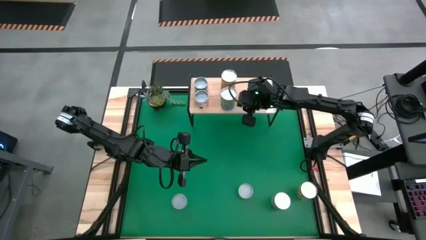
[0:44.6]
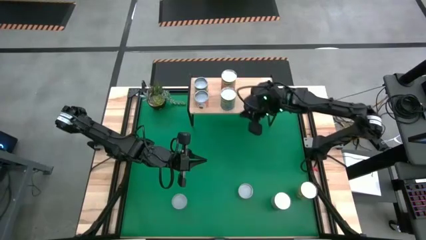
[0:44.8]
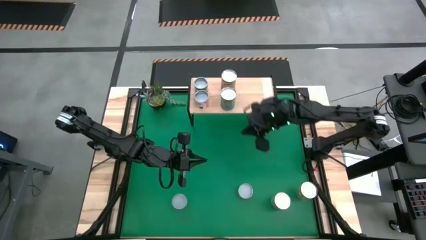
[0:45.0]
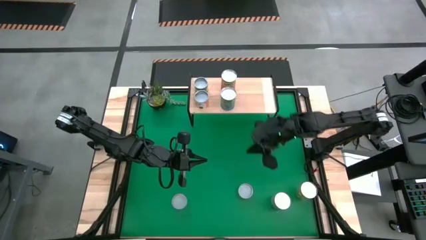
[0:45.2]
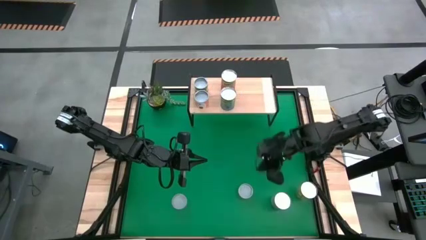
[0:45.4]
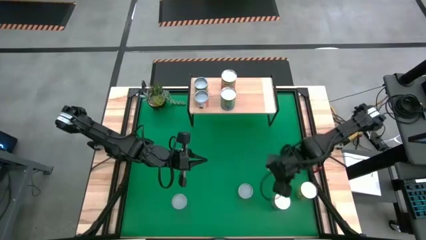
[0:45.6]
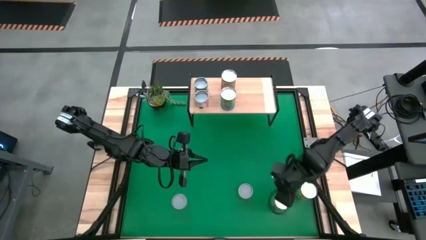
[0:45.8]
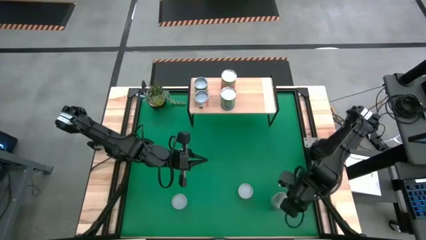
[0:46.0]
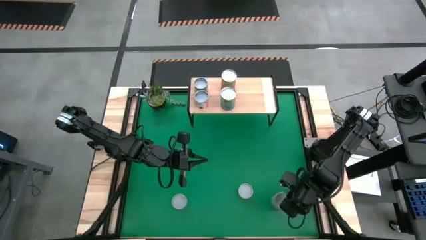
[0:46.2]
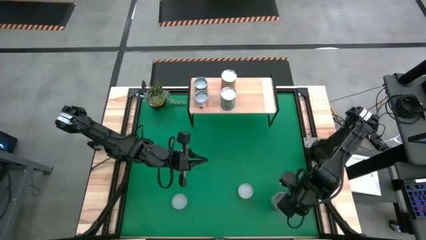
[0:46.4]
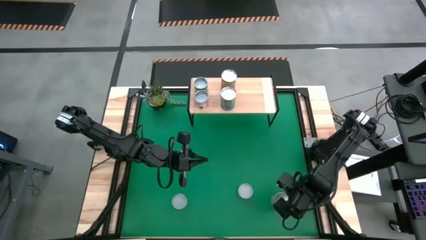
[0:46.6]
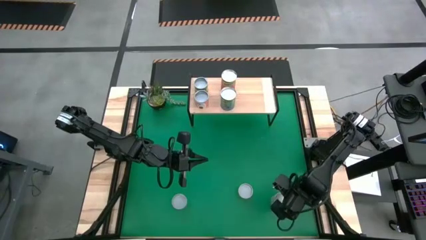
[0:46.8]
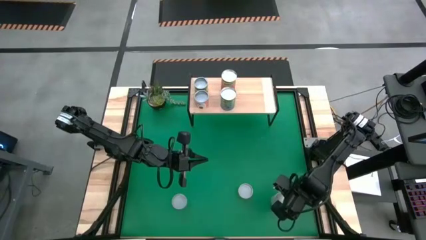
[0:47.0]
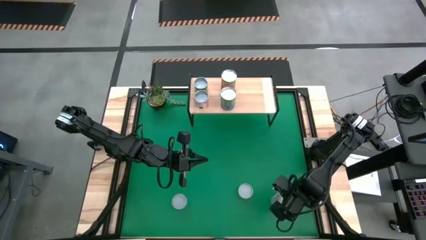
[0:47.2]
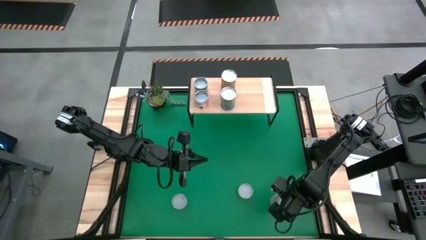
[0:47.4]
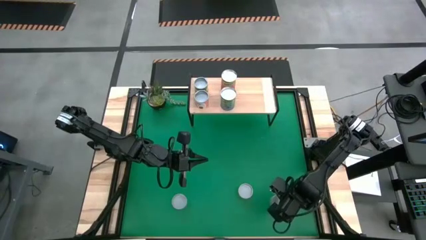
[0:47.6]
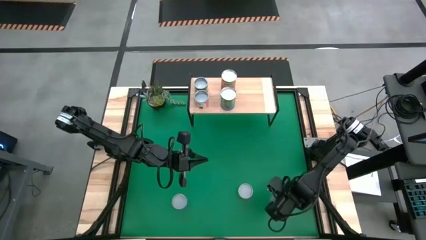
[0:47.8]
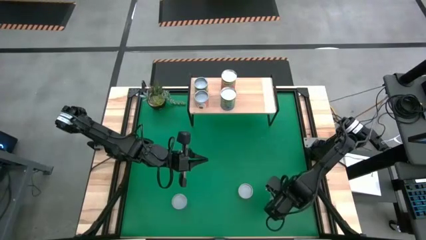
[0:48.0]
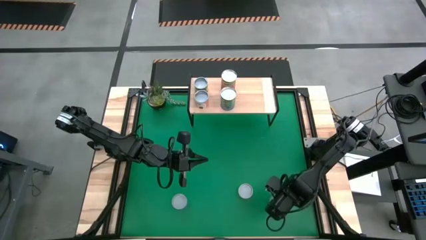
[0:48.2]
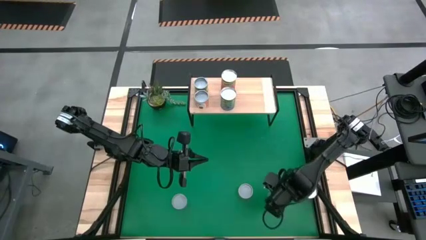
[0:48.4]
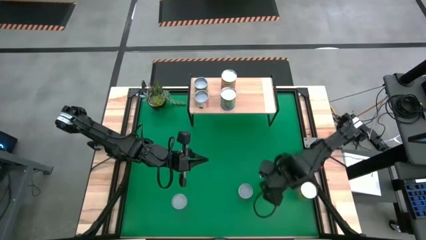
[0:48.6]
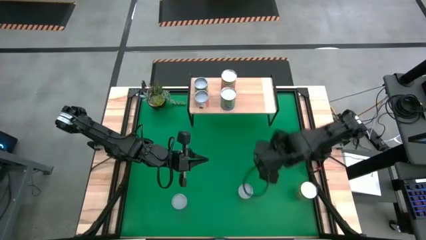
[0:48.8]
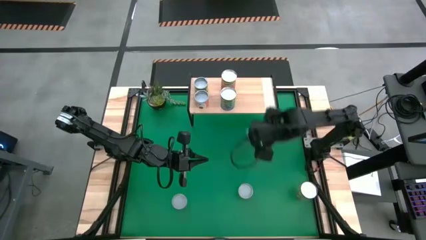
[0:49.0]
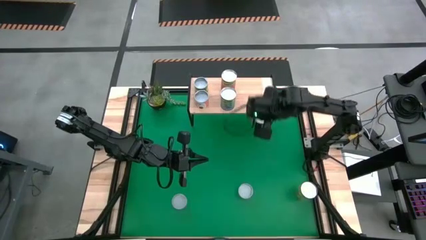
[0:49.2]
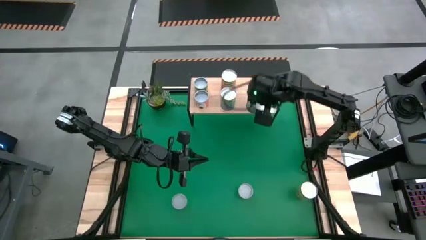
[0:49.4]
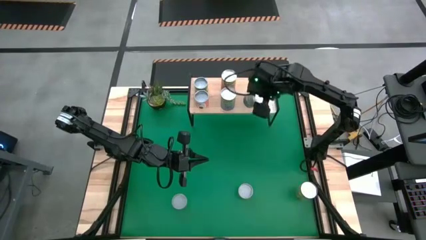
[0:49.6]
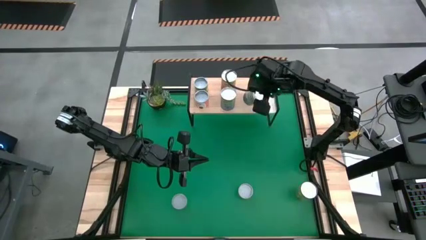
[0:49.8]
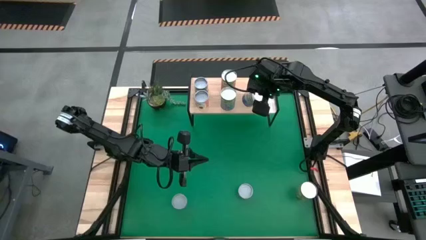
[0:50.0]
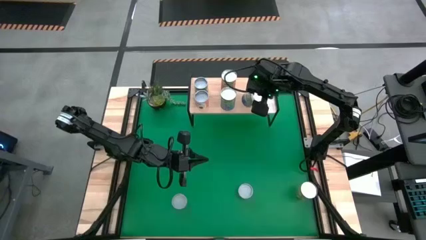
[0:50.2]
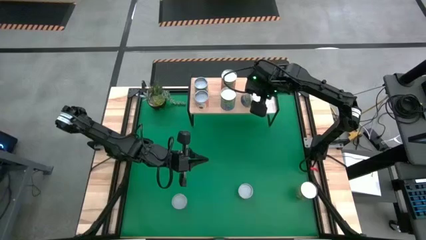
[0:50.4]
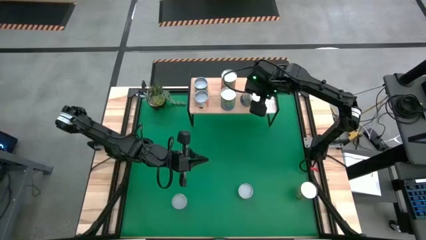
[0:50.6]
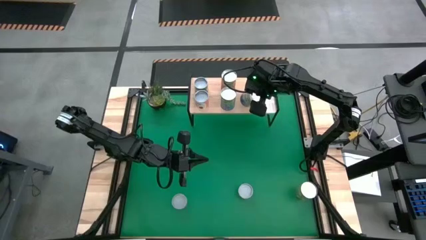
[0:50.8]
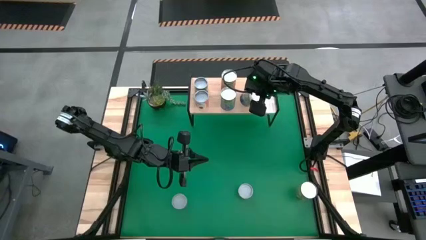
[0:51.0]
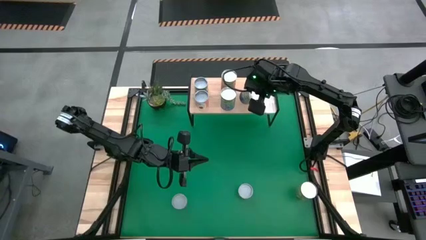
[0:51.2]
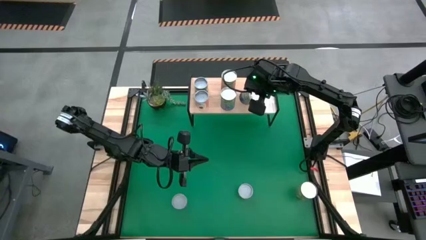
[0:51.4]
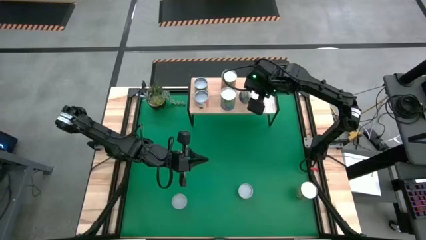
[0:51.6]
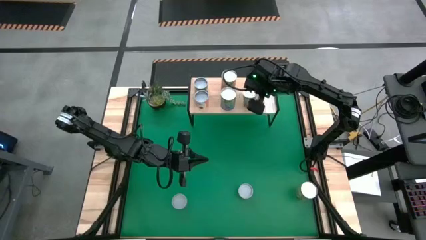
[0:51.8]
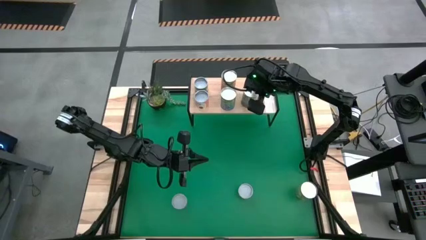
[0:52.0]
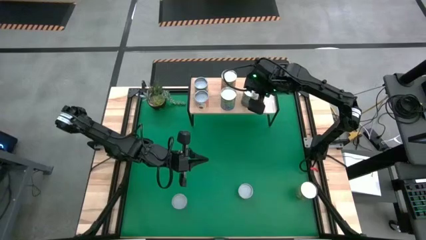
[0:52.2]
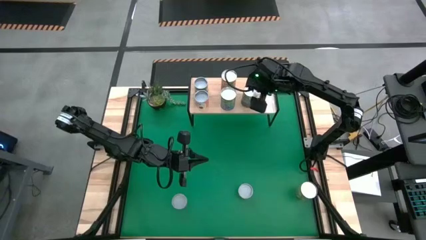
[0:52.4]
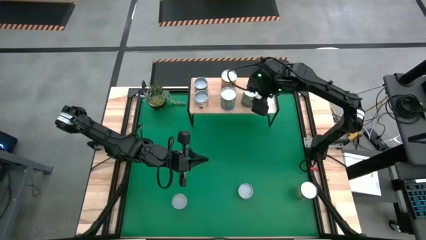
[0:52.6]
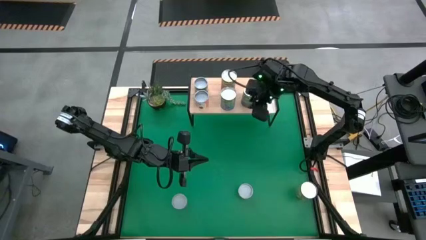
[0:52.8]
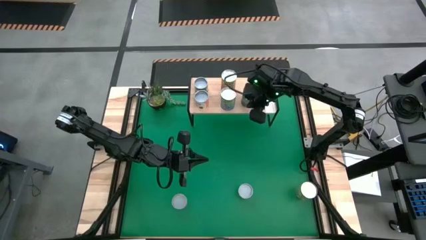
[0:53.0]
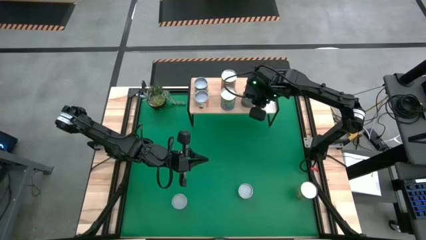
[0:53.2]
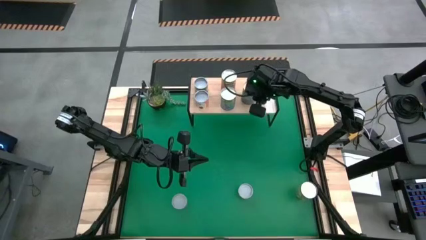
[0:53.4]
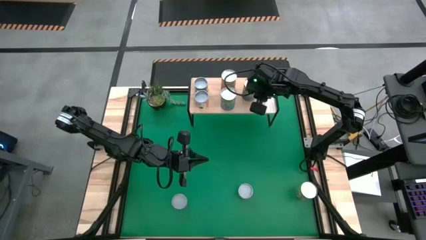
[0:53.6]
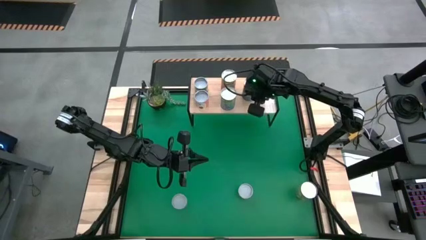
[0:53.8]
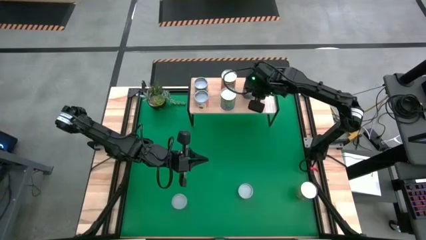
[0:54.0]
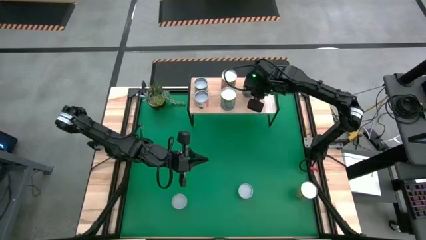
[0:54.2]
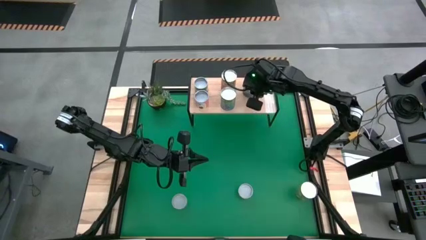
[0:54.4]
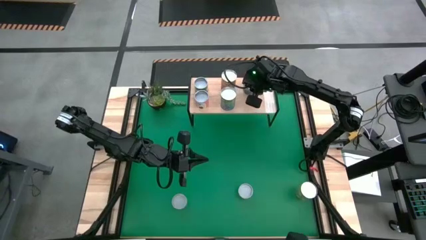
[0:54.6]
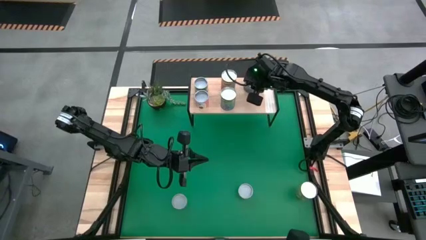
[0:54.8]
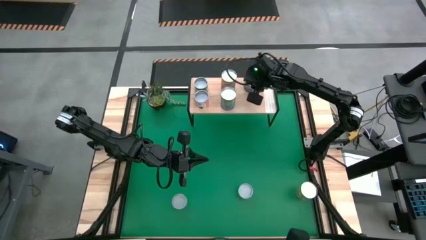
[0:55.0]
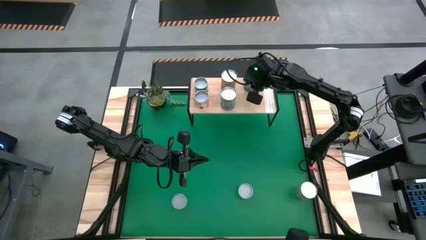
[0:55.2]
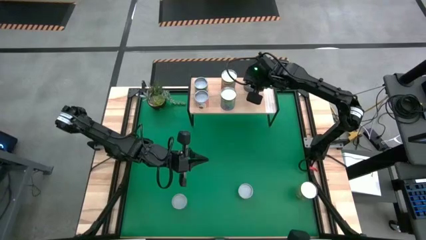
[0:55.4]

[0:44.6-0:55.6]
Task: Pick and place cans onto a shelf
Put the canned peas on the shelf

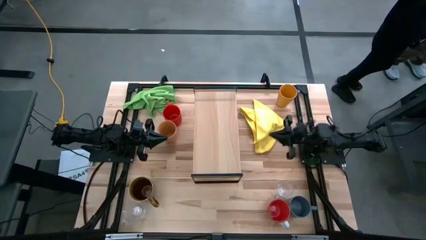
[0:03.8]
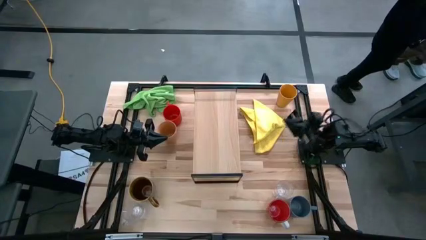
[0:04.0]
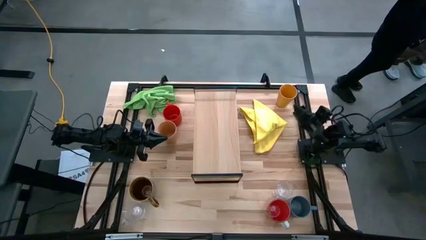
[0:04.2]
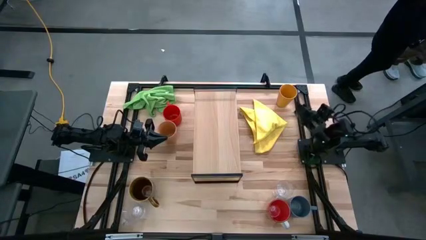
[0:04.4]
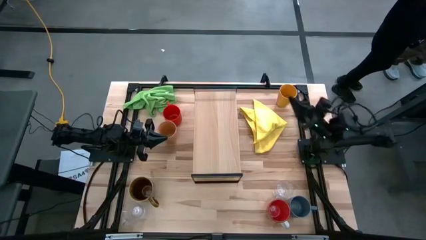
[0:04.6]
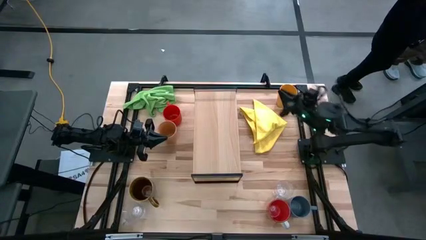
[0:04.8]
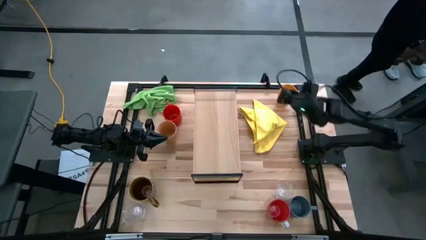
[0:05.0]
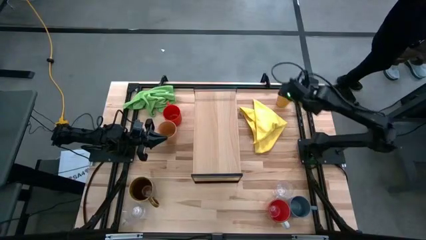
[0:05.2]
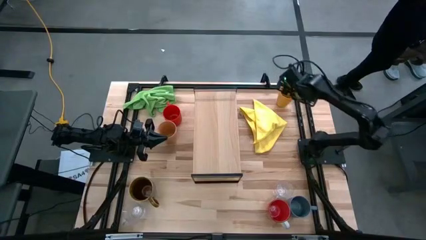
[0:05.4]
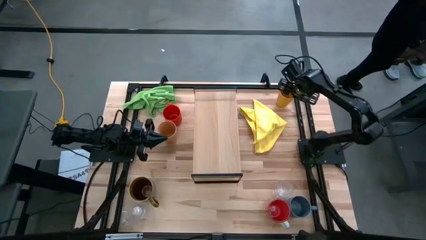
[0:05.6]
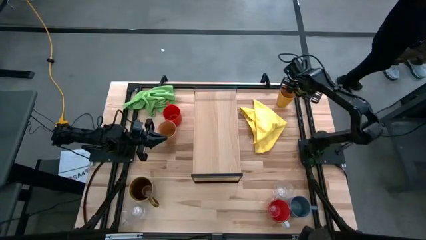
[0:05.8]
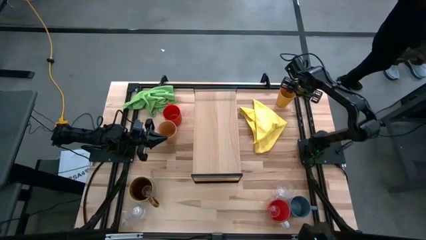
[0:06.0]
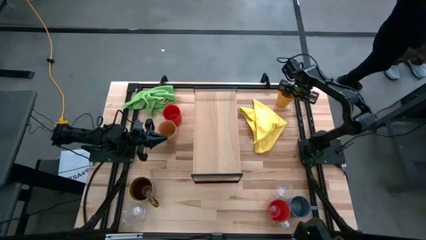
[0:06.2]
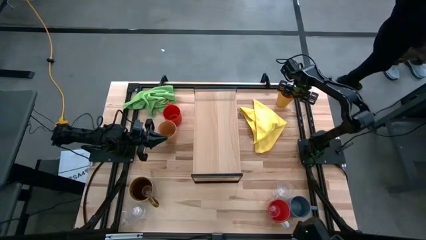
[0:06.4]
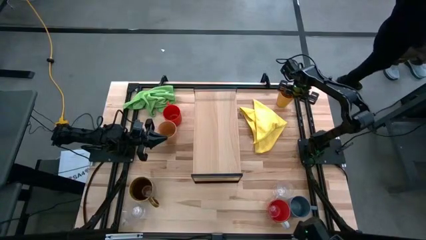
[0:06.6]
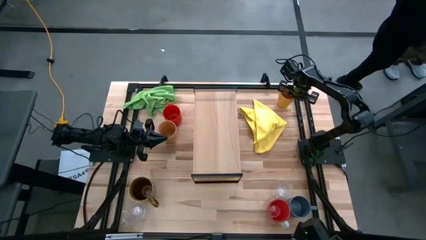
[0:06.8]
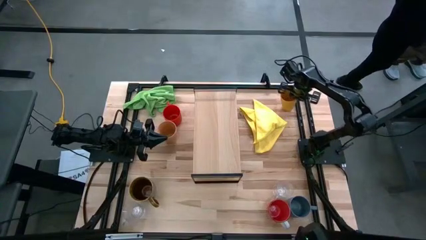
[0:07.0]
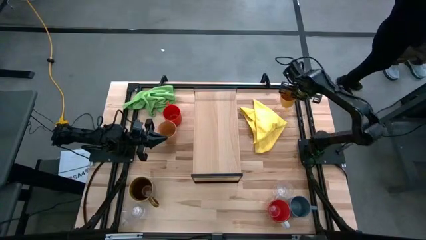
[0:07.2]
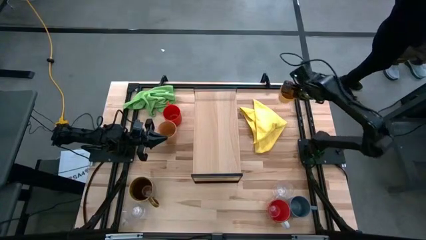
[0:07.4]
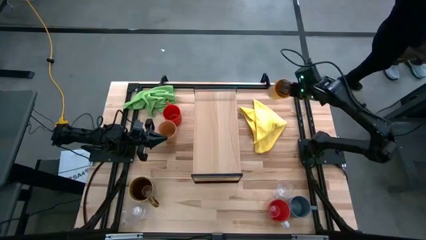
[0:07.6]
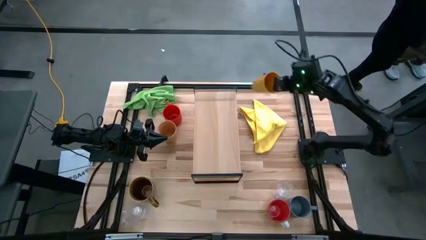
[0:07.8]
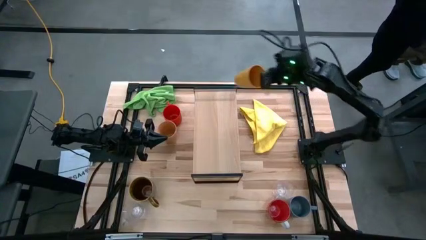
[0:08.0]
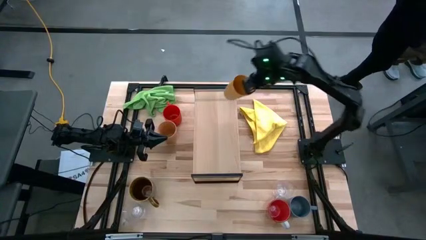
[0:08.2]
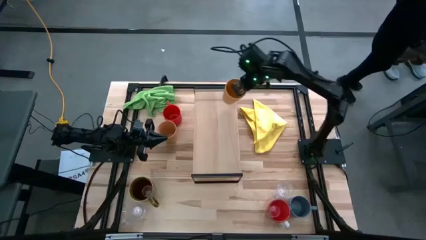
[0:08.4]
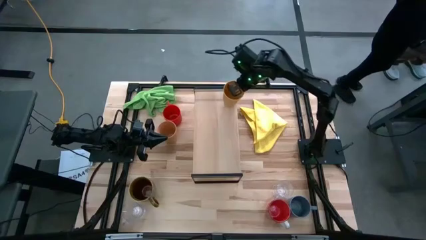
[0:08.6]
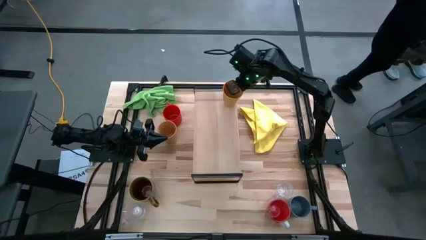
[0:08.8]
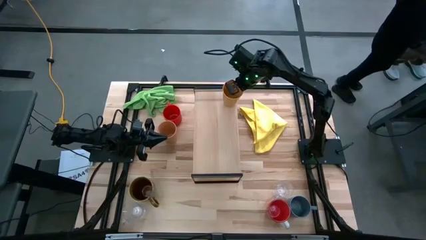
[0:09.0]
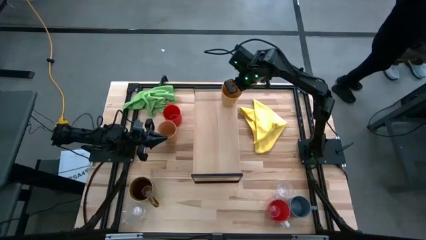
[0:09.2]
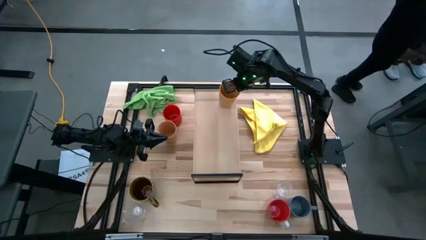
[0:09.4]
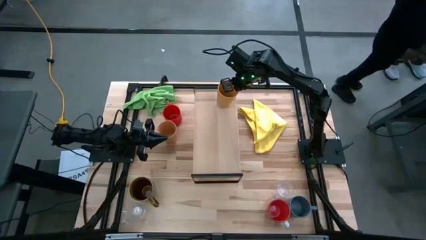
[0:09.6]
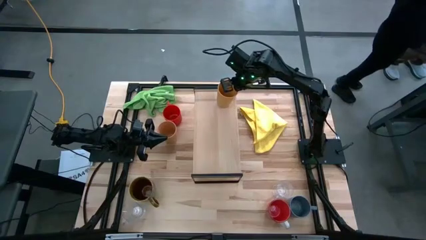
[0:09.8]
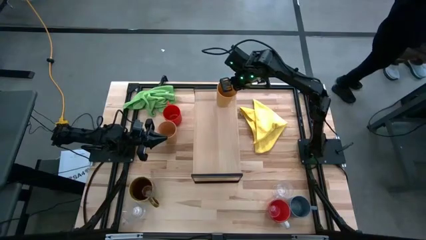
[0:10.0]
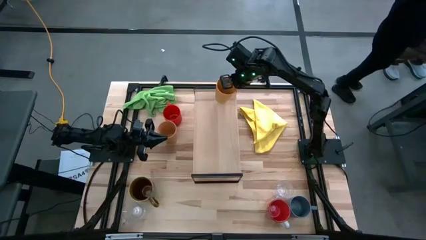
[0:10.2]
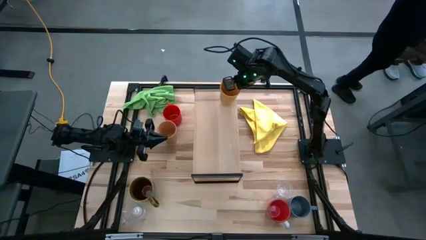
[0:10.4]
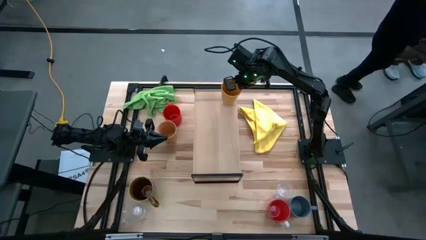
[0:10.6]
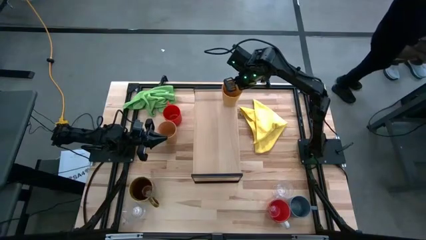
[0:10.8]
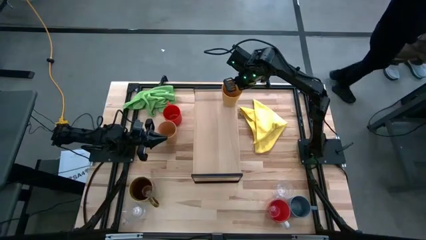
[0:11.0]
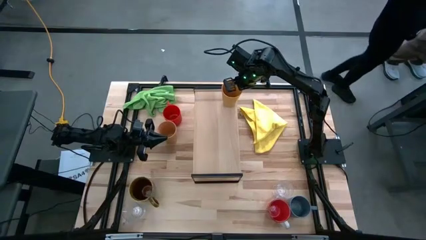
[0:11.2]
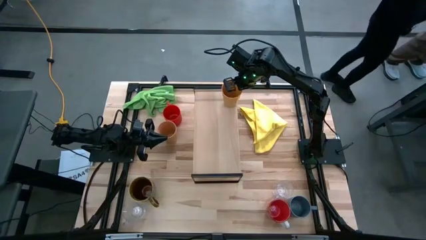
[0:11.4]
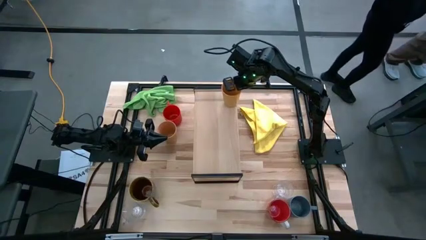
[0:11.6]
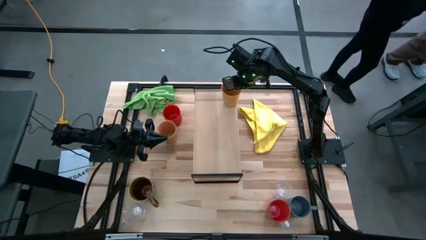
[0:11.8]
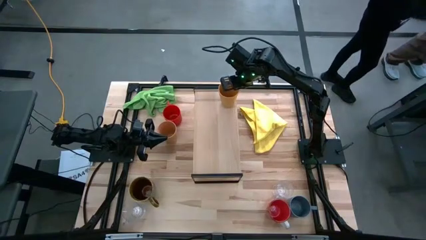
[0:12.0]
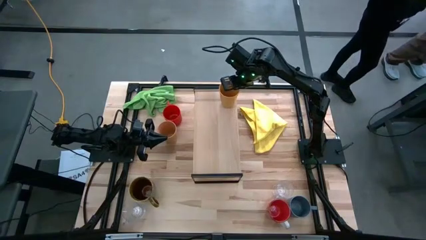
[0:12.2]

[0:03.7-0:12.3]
Task: Stack small to large cups/mugs on shelf
Put the yellow cup on the shelf
